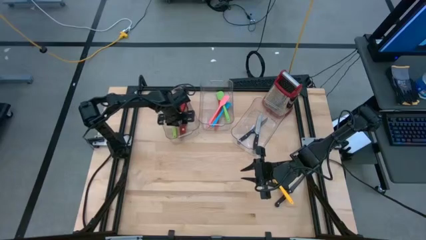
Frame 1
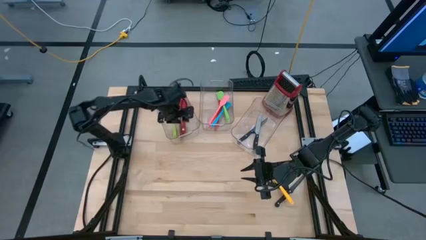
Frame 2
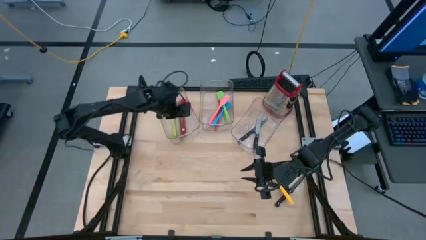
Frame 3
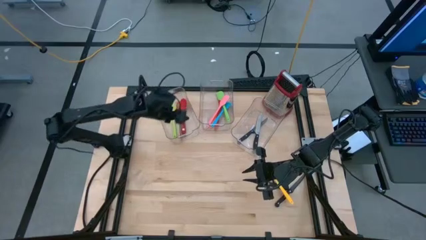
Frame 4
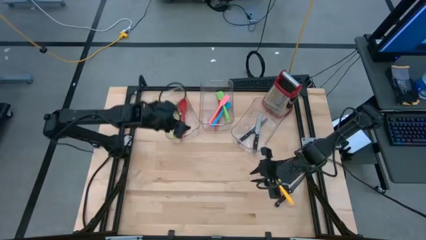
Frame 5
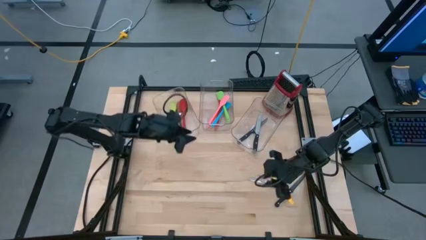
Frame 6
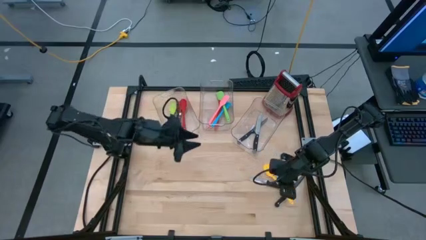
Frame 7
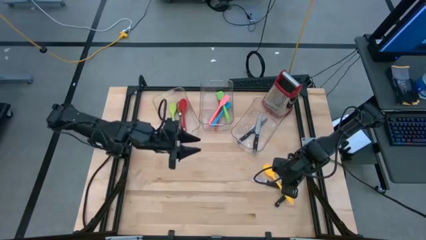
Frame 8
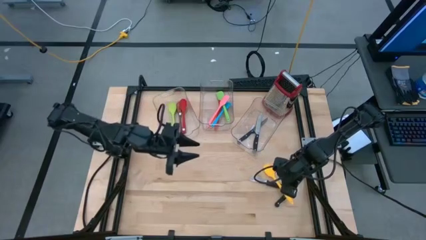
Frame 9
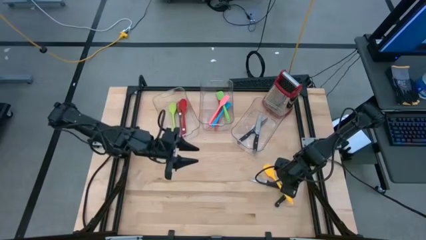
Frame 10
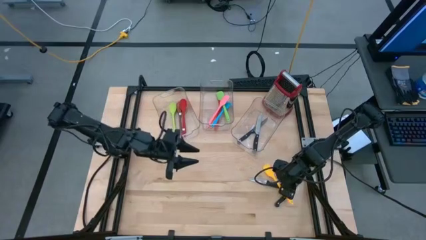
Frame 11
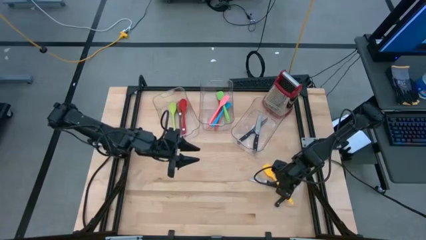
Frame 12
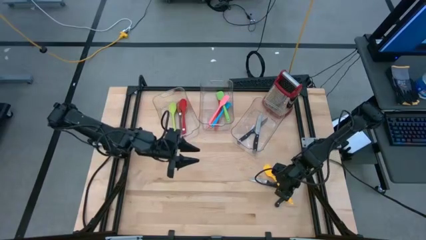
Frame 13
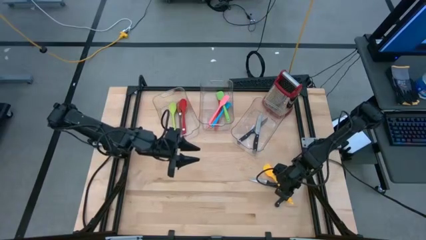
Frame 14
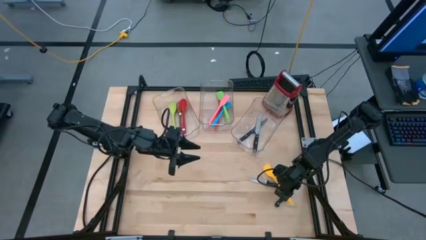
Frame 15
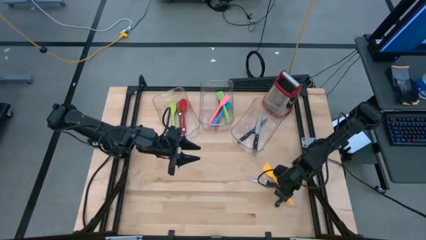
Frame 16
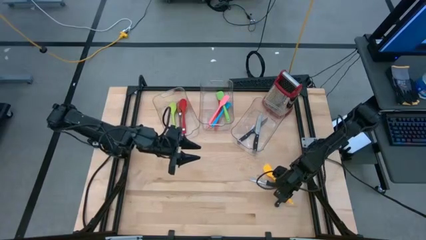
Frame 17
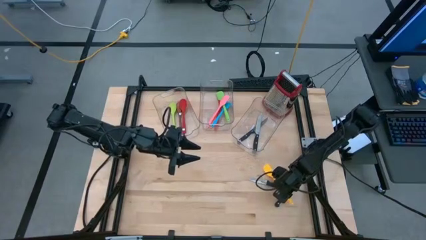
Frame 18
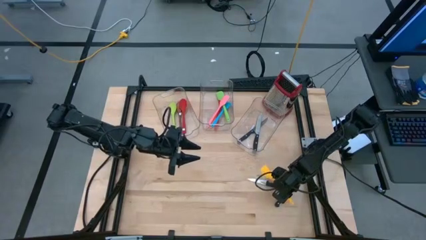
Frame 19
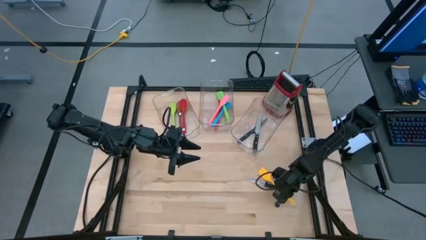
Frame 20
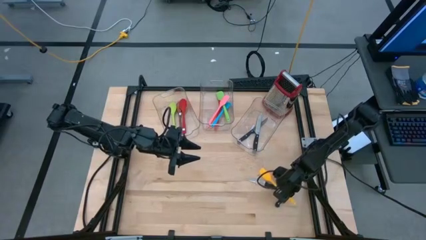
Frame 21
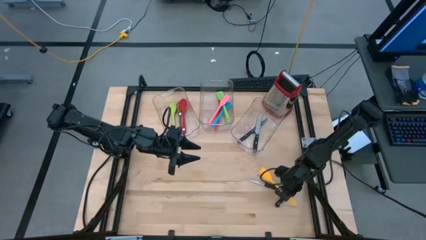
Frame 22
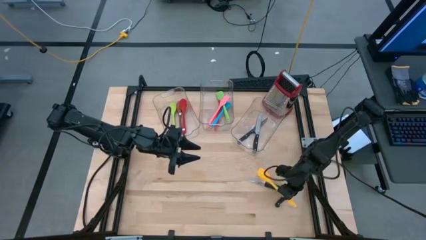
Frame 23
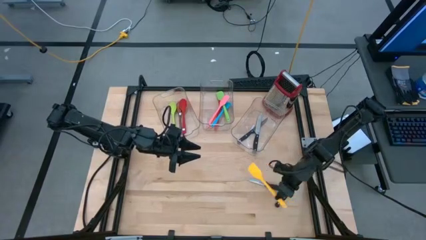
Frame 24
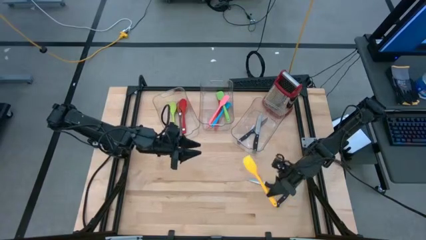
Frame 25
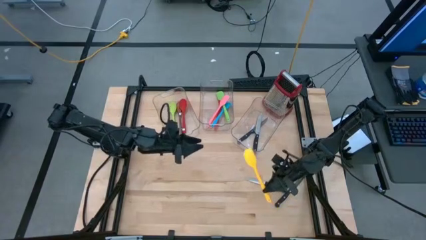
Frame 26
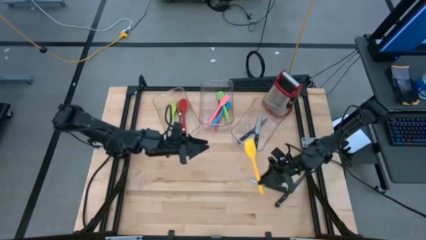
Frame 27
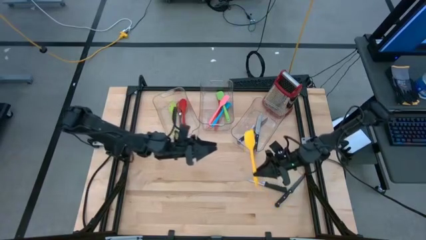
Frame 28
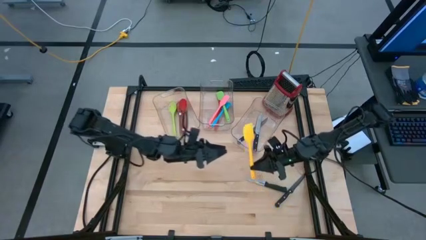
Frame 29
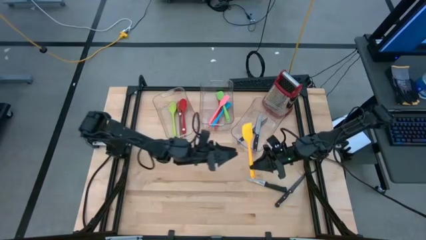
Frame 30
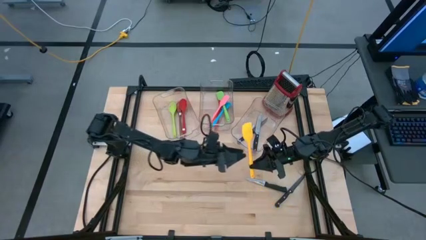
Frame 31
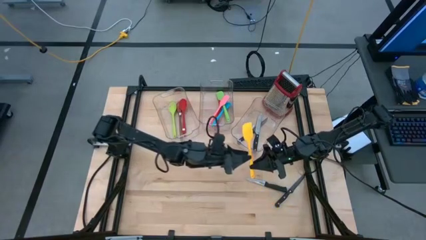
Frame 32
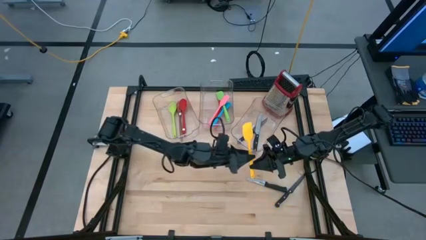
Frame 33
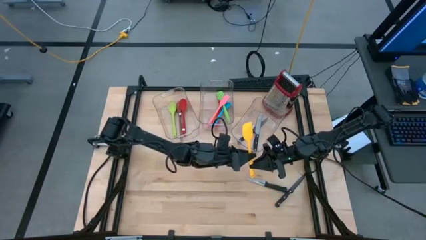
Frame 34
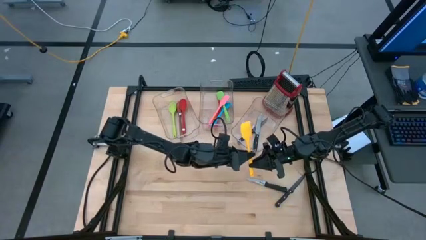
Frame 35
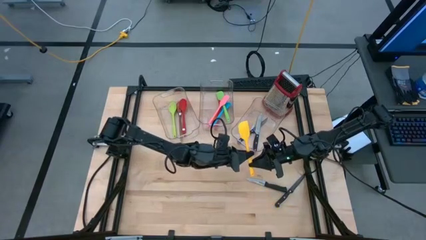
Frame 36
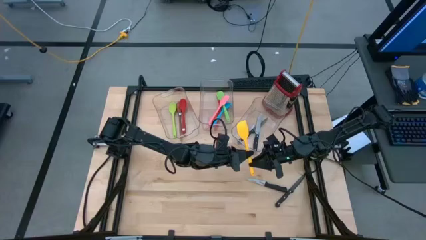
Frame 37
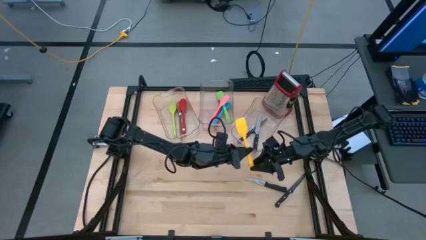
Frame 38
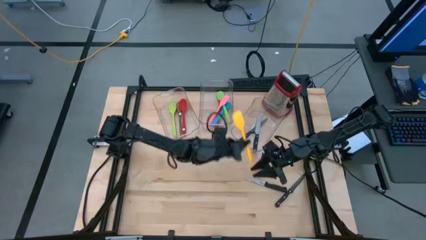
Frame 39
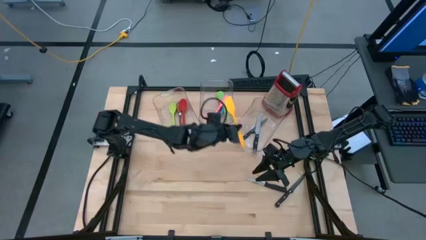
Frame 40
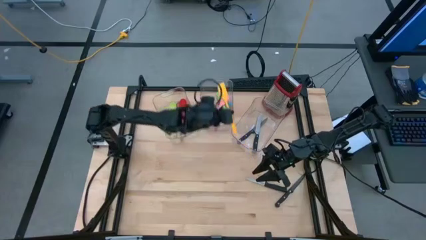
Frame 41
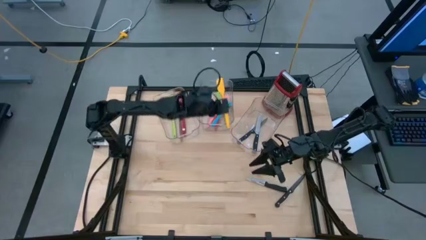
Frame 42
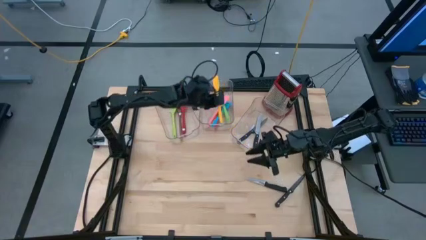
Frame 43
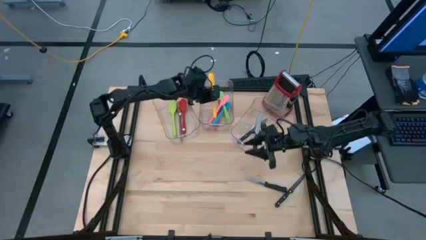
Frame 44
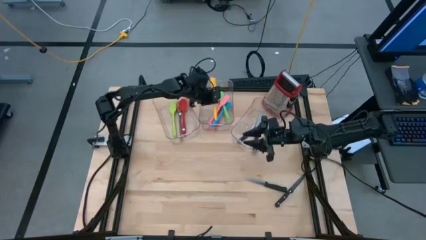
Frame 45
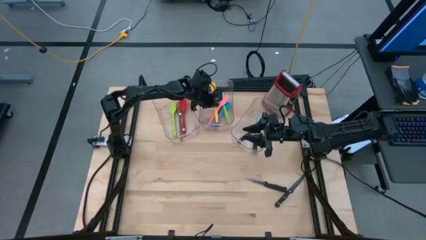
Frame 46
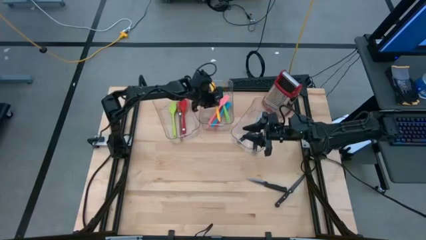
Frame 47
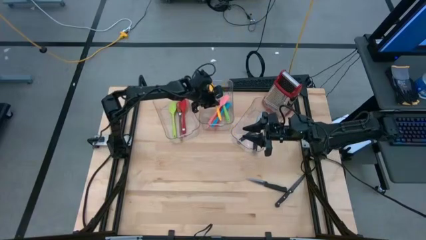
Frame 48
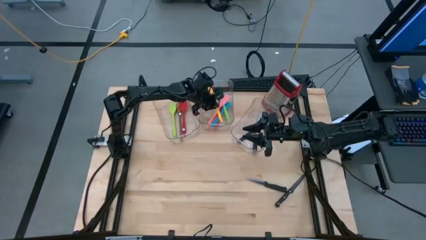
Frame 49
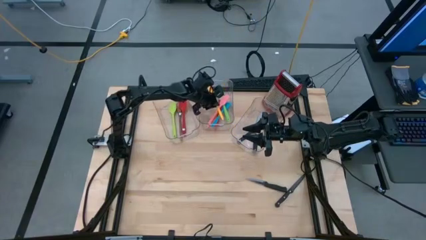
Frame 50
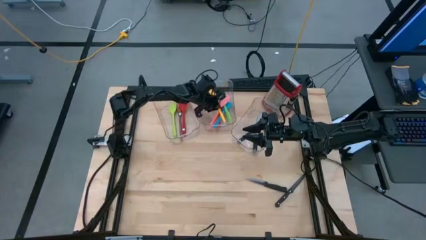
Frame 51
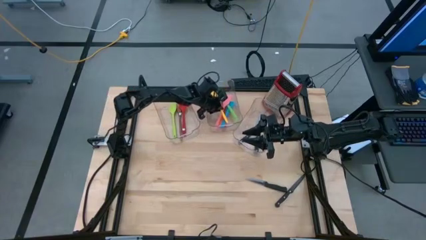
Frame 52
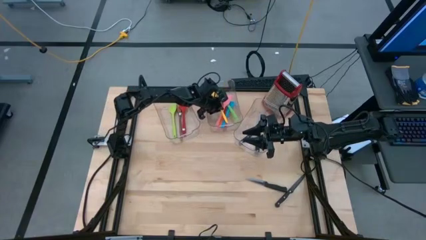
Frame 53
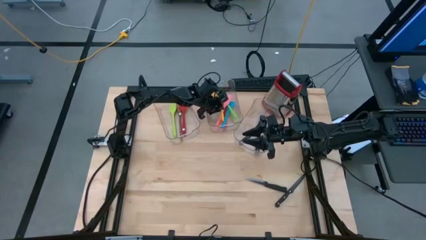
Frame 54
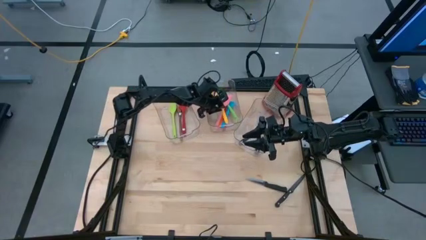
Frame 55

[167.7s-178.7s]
Task: Pick & Place Kitchen Items
Put the yellow spatula in the left bin

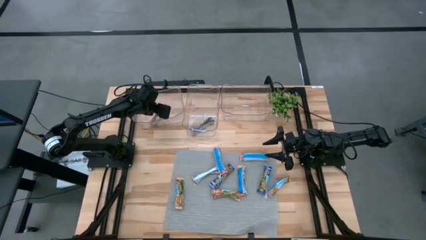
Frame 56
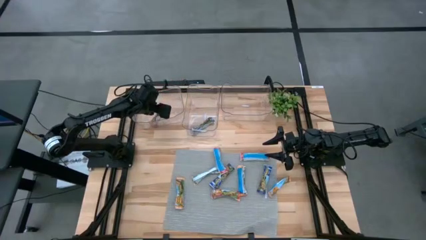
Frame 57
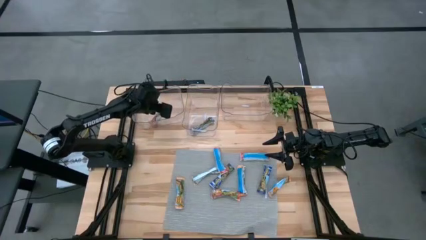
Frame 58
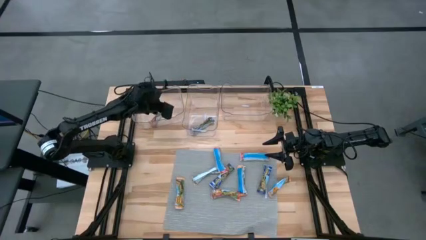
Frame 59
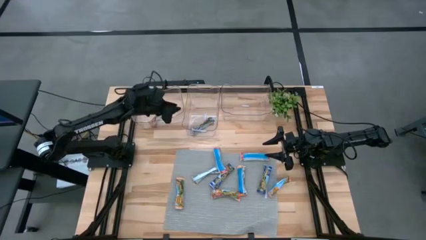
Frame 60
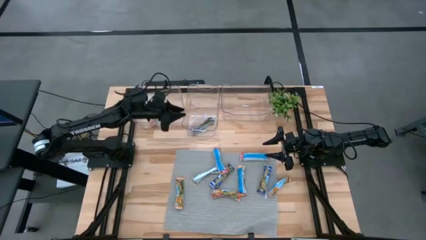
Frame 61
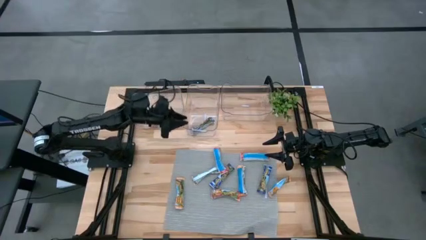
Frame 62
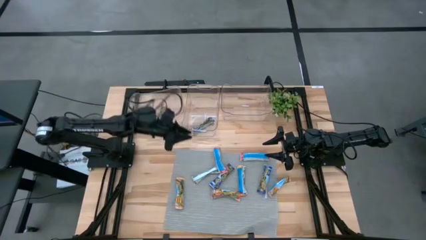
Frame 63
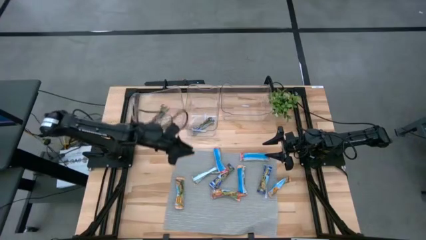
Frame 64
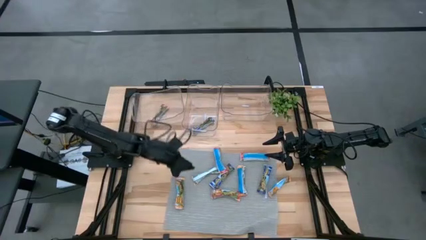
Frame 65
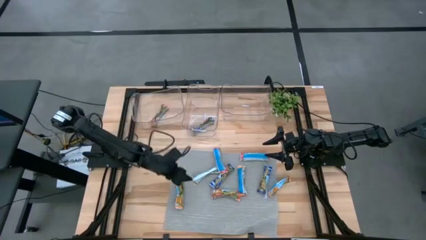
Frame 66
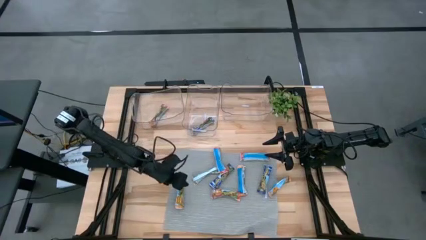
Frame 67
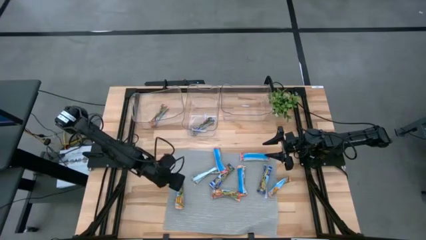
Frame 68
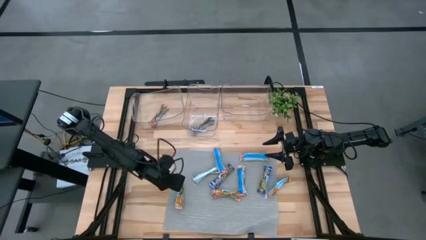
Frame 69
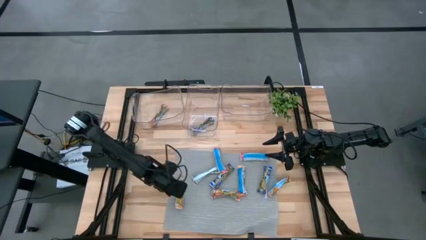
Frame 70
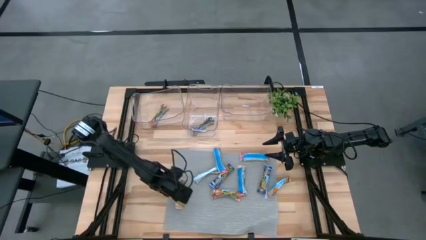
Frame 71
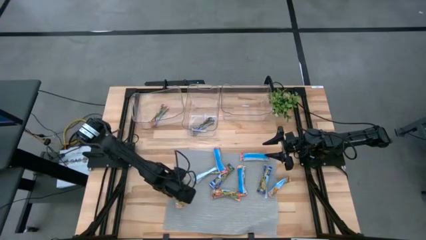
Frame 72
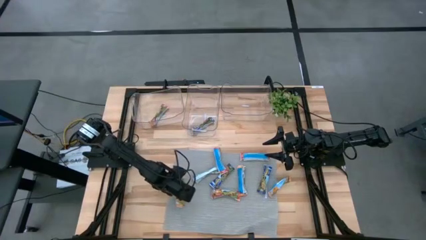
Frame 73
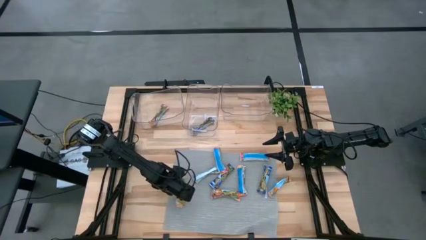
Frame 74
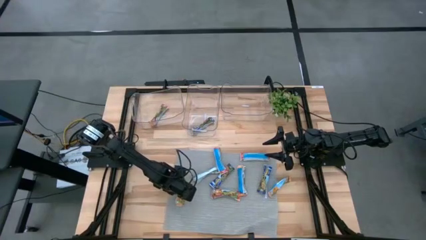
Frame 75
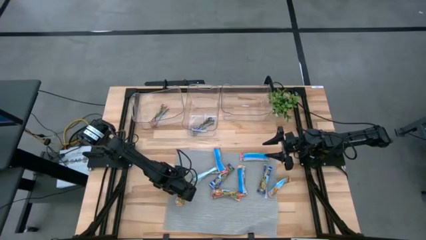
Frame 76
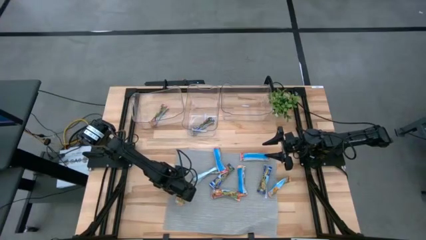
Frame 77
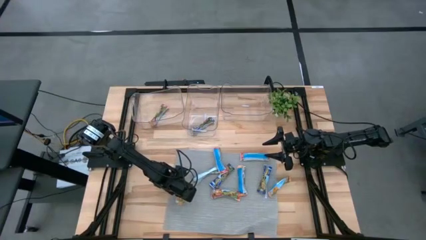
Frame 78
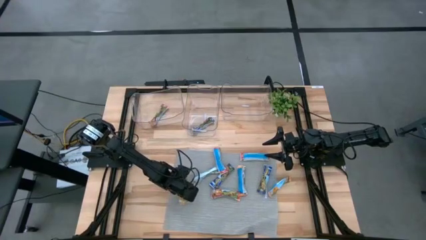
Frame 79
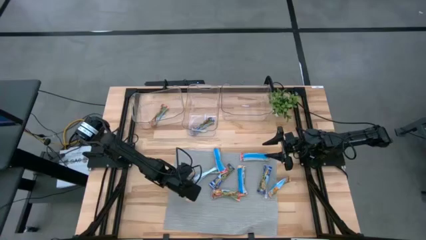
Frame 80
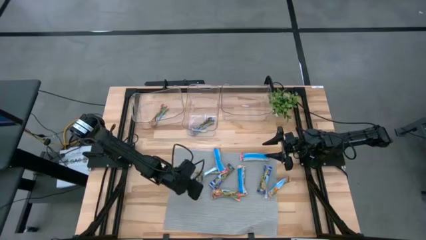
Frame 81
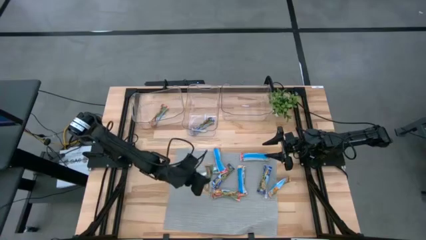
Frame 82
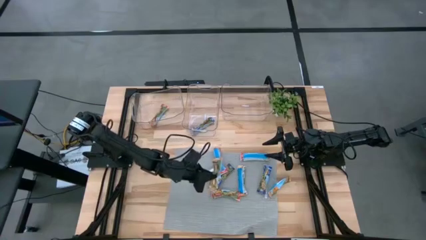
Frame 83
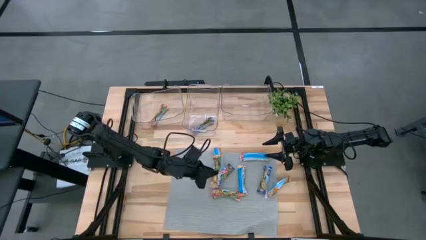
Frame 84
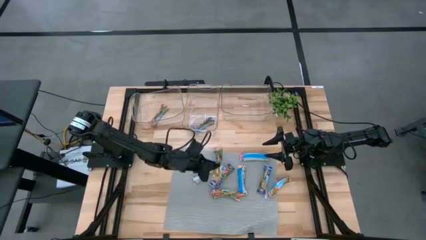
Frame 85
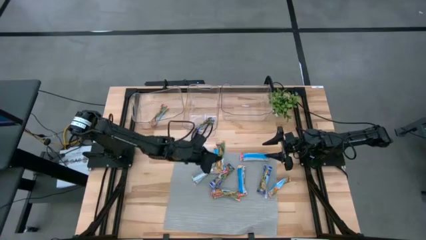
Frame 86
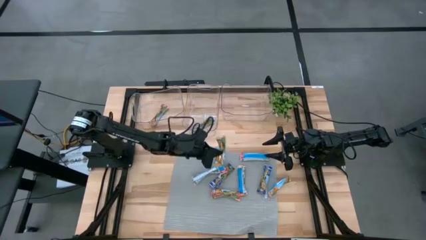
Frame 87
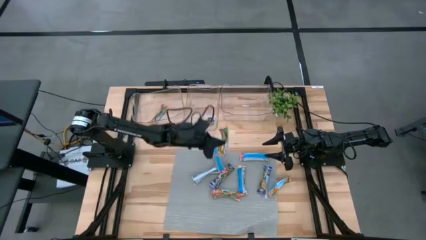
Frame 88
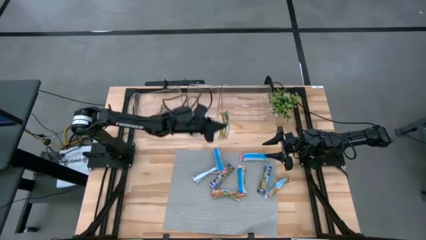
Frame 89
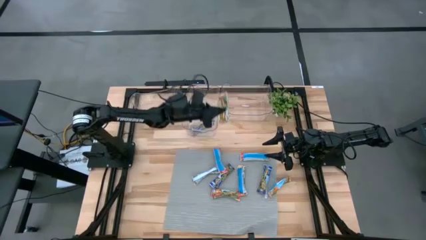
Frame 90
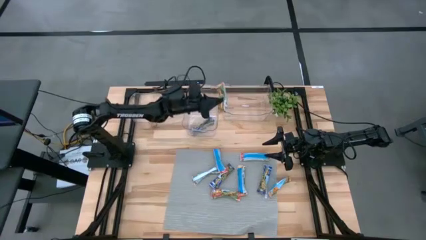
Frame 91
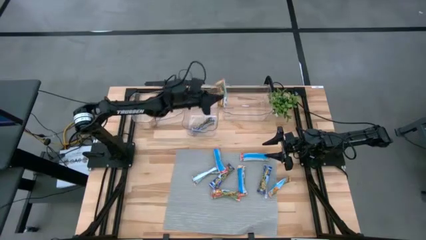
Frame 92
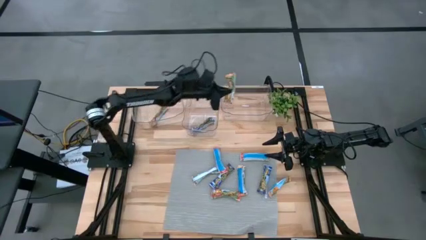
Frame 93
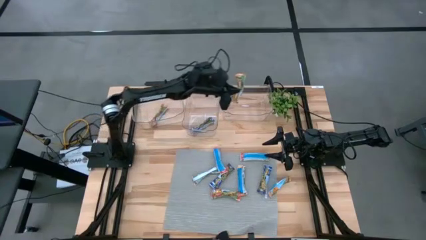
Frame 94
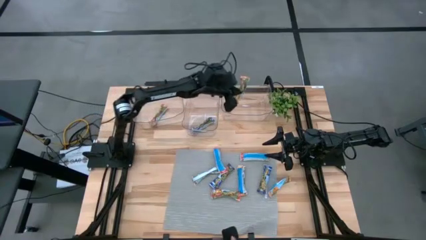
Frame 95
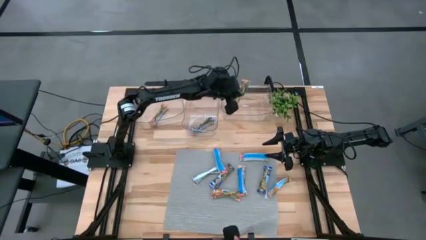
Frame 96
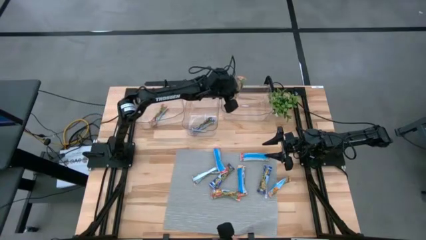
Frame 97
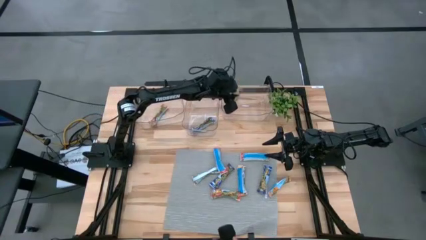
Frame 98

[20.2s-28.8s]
Task: Pick and place Granola Bars by type
Put the left yellow granola bar into the right transparent bin
